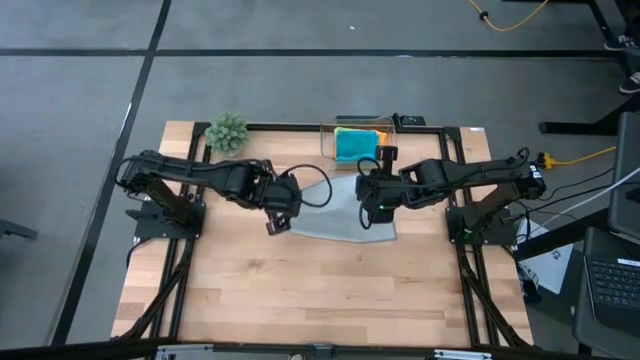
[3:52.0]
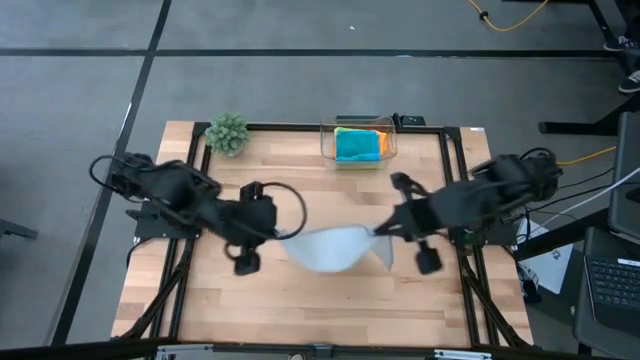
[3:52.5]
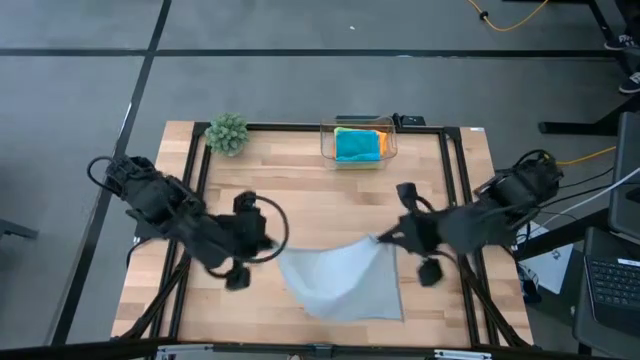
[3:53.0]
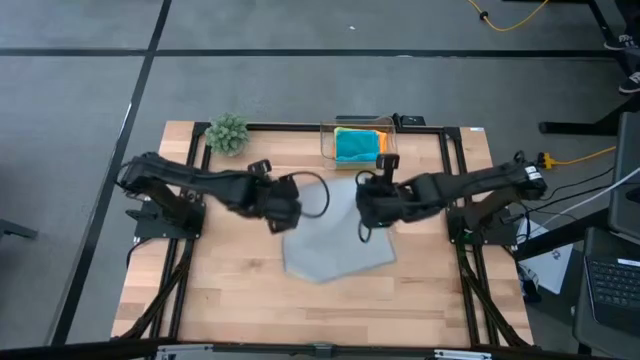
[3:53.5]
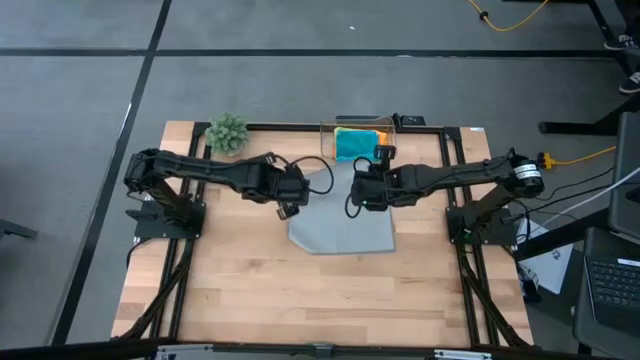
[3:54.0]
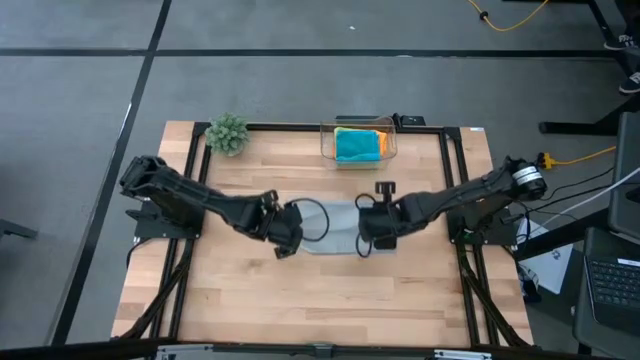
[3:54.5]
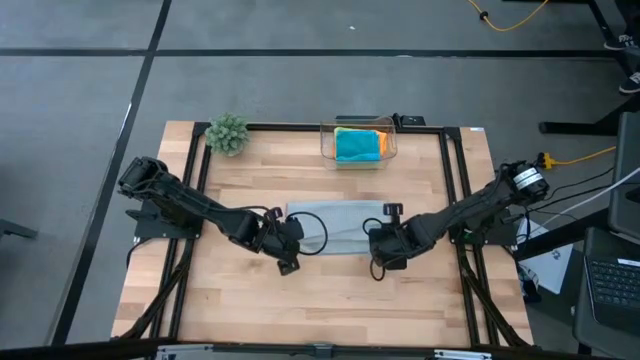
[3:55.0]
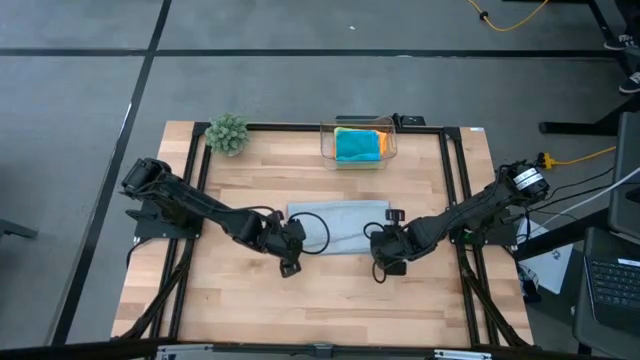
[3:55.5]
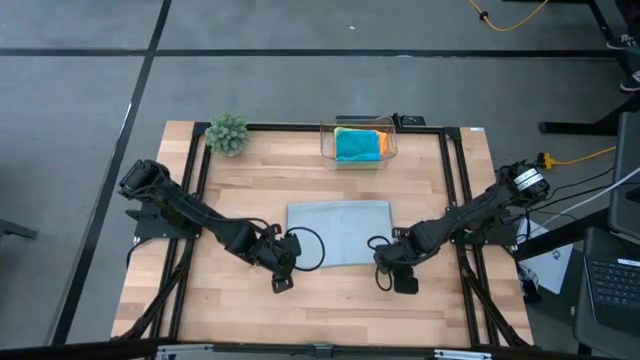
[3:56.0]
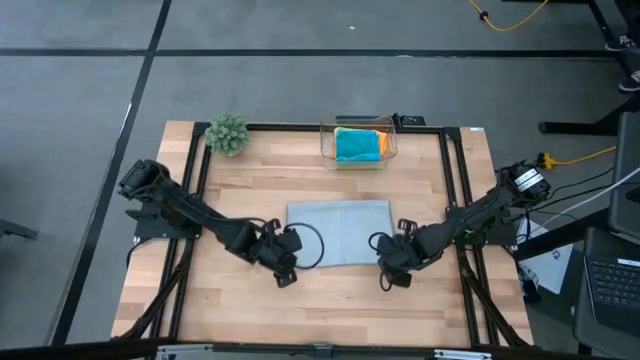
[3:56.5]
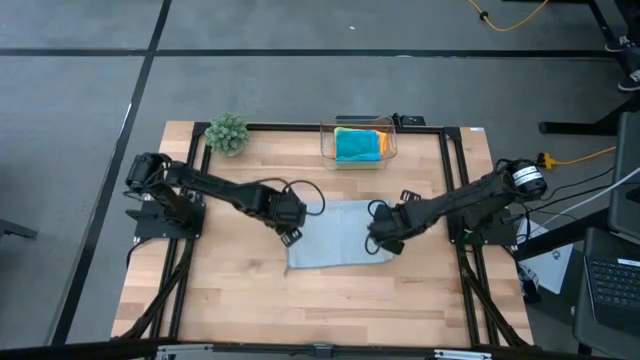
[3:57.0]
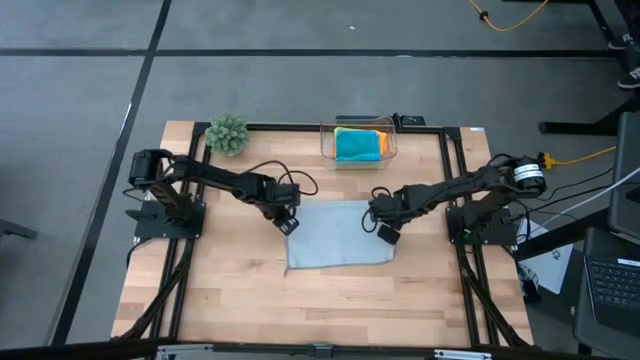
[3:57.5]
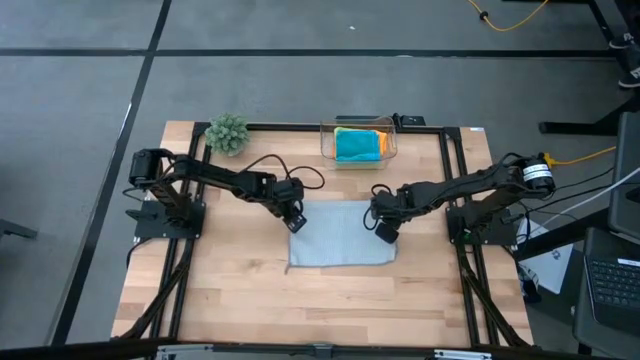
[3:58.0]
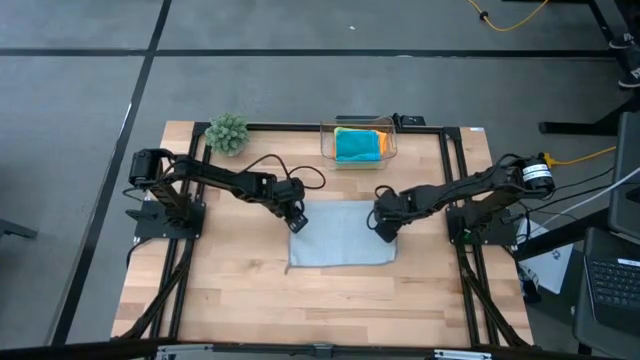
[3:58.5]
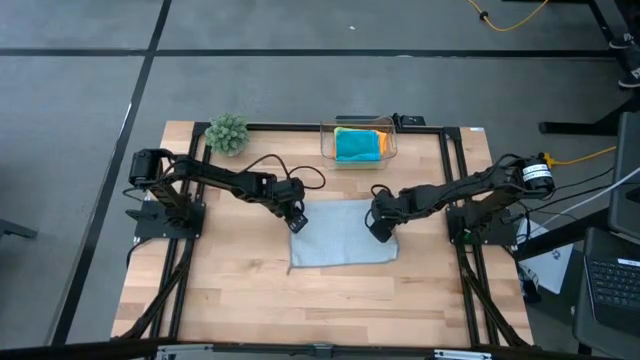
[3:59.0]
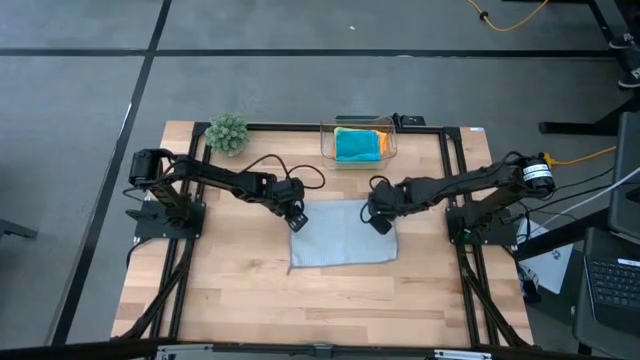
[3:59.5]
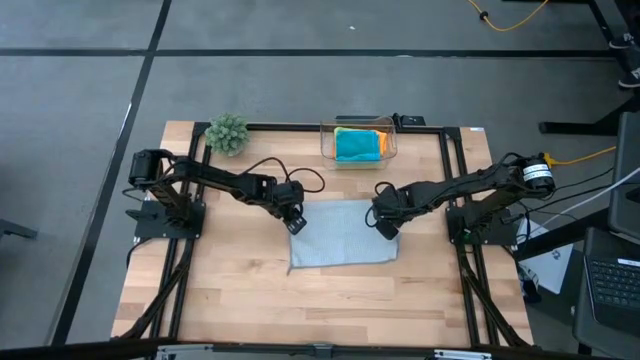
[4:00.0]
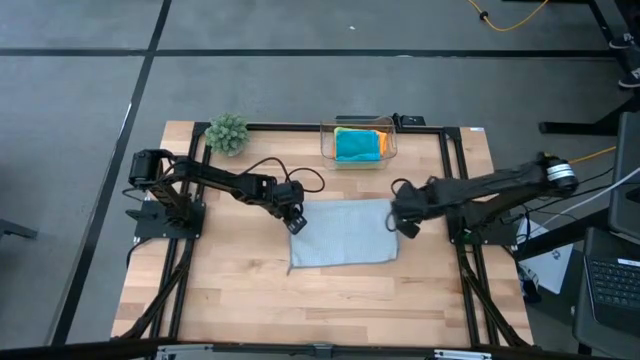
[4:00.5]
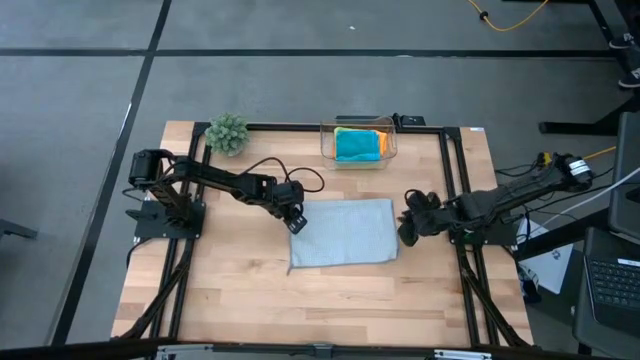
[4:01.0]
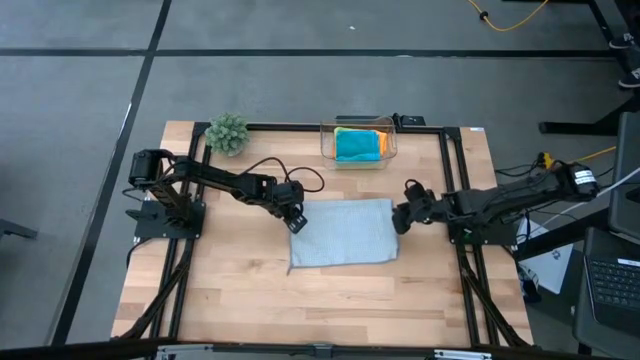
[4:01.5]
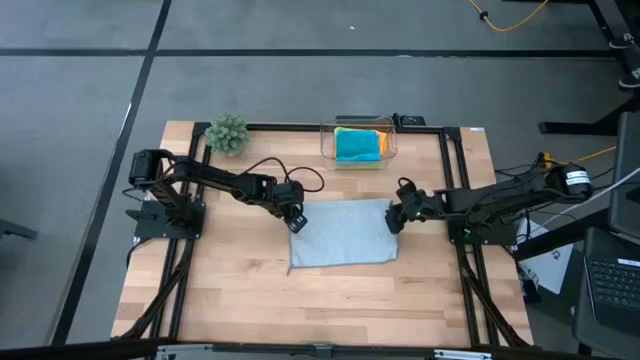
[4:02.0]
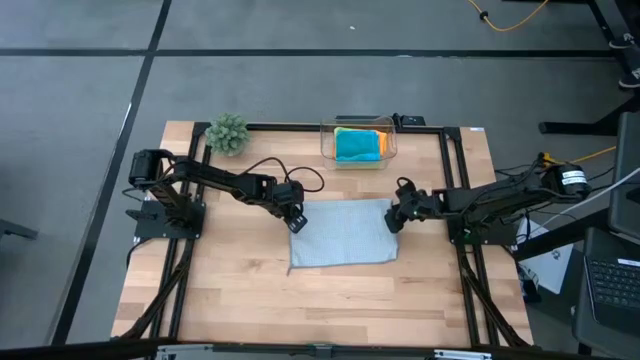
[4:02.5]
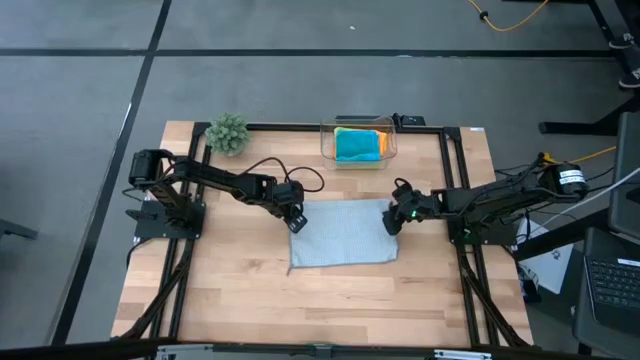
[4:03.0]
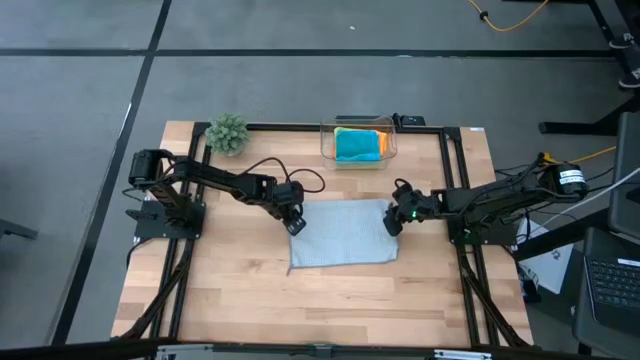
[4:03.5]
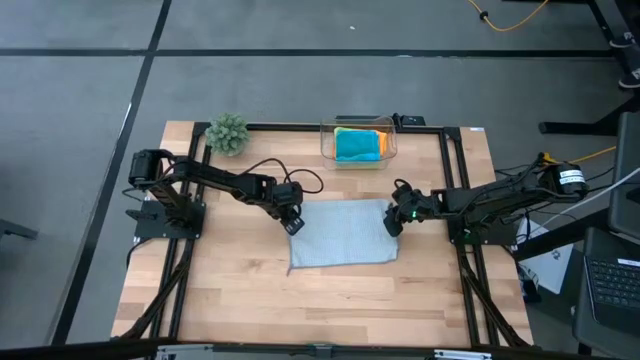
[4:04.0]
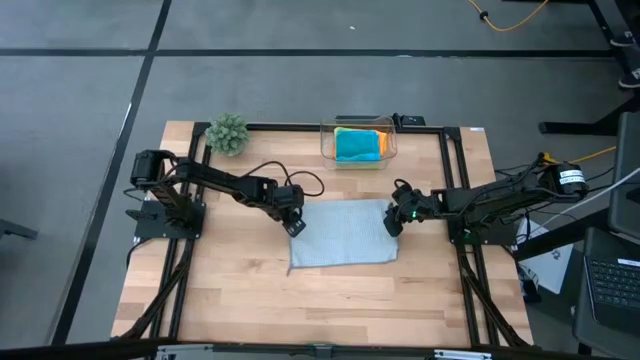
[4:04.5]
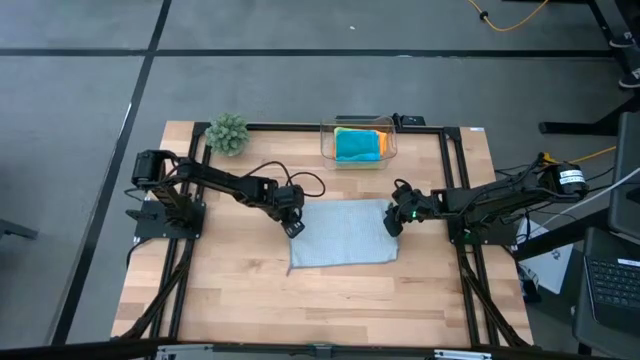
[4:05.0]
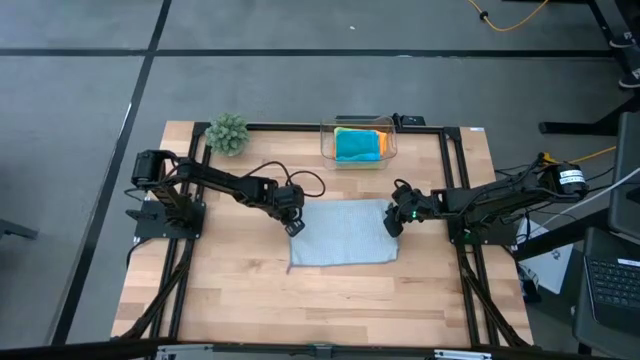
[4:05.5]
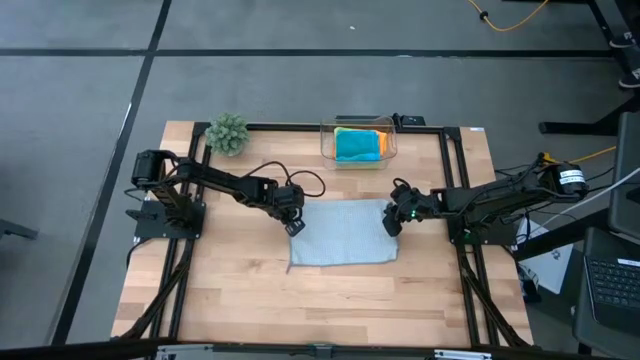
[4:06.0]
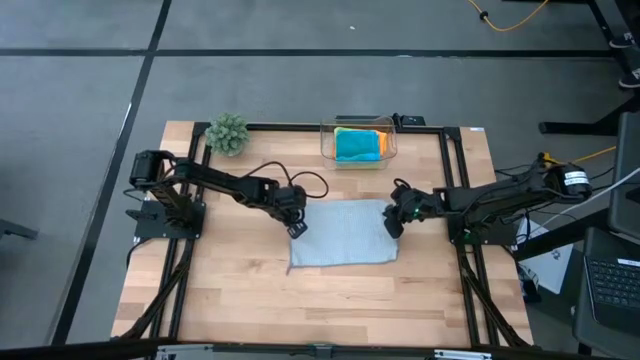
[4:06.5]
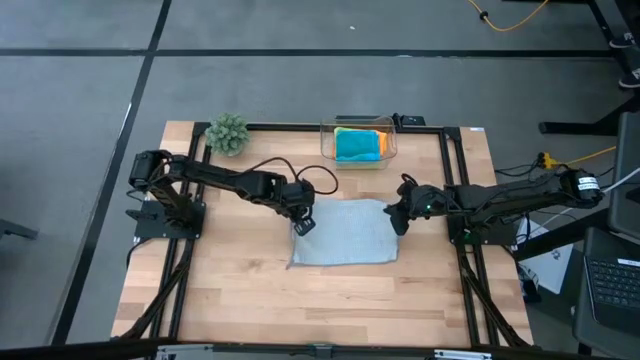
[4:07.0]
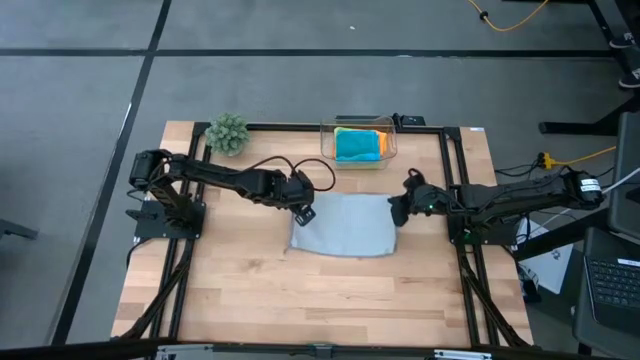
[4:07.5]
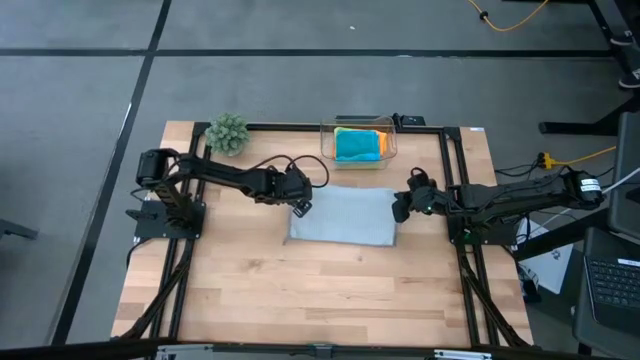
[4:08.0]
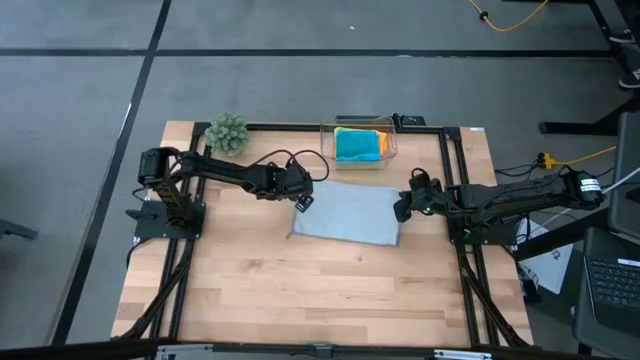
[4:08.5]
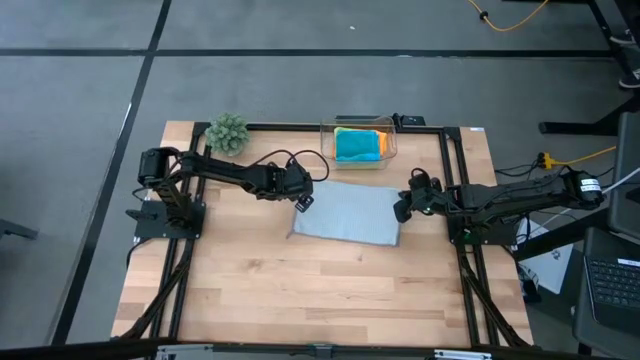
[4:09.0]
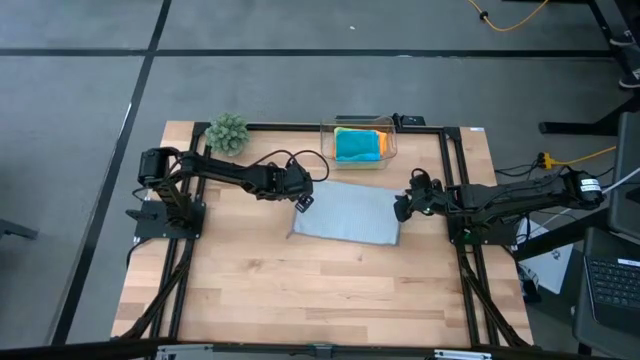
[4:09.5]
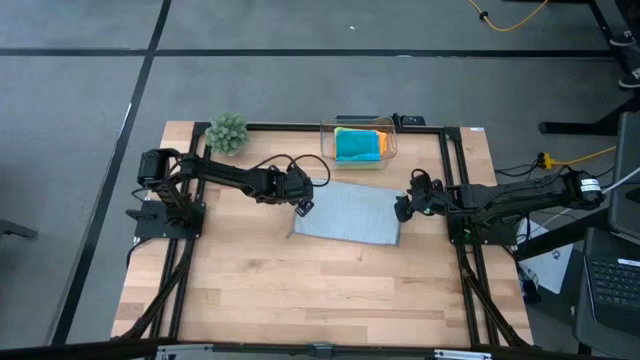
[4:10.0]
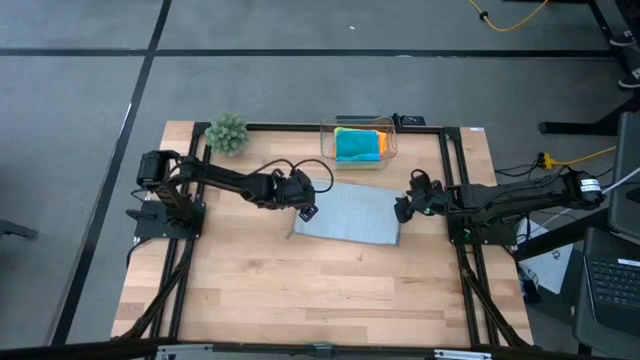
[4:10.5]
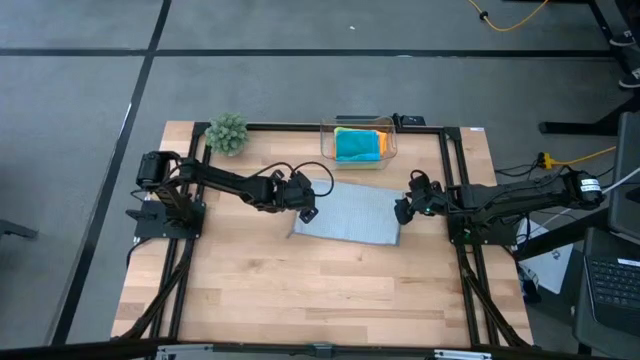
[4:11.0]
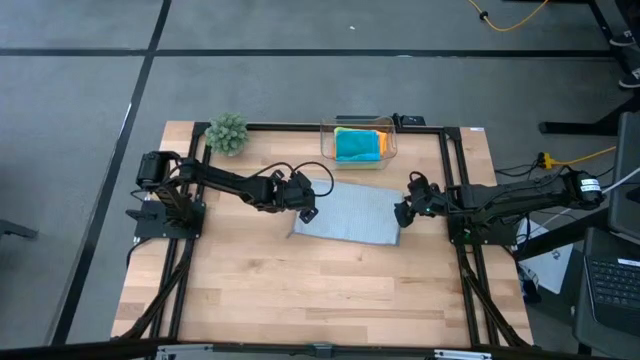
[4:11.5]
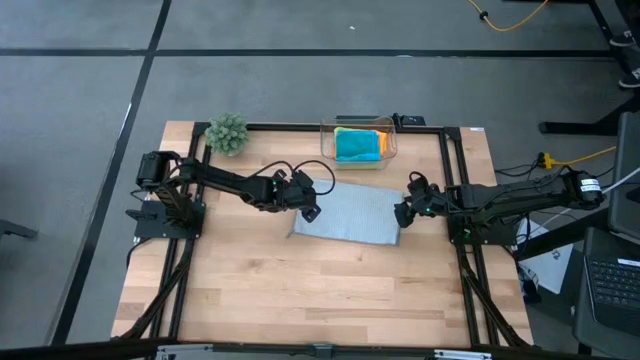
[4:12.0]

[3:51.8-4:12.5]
Task: Fold microfiber towels
Fold the gray microfiber cloth
